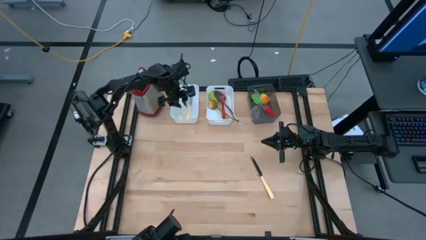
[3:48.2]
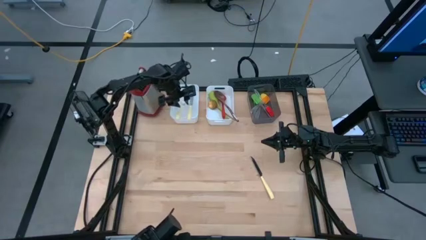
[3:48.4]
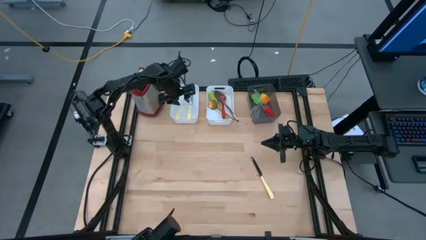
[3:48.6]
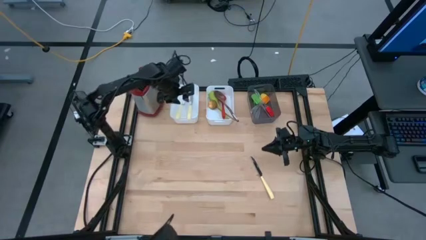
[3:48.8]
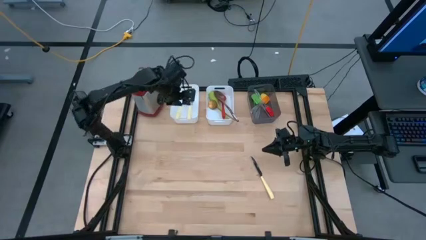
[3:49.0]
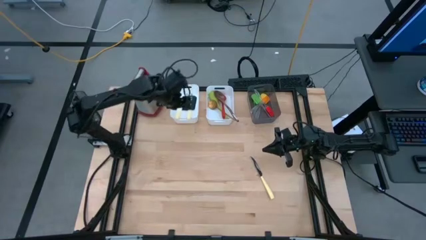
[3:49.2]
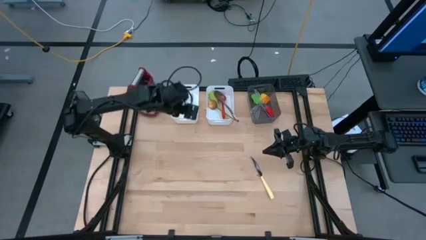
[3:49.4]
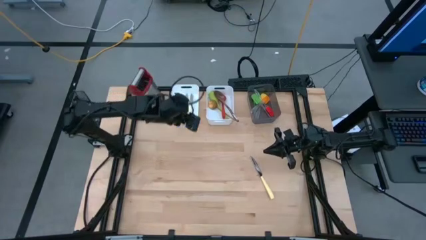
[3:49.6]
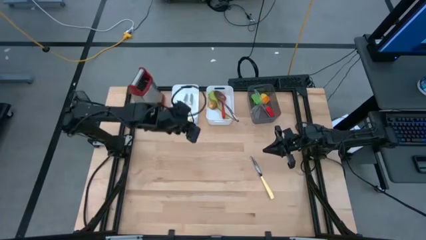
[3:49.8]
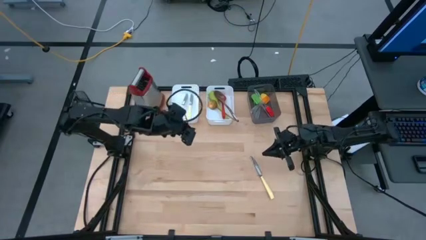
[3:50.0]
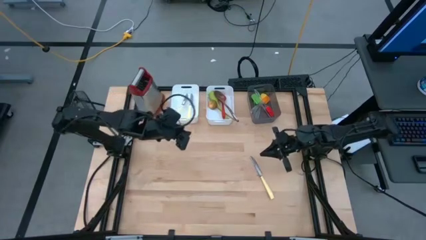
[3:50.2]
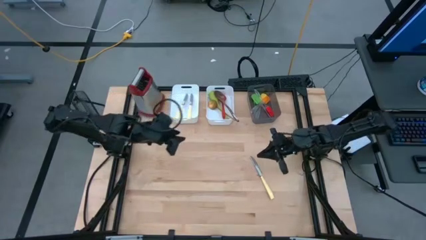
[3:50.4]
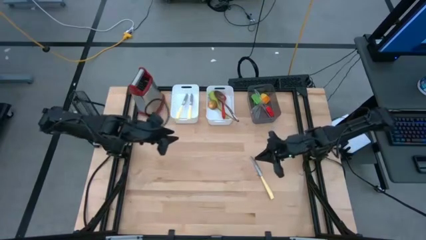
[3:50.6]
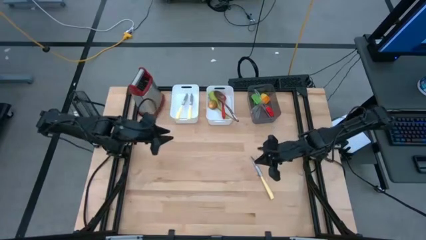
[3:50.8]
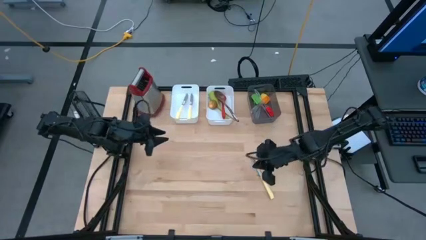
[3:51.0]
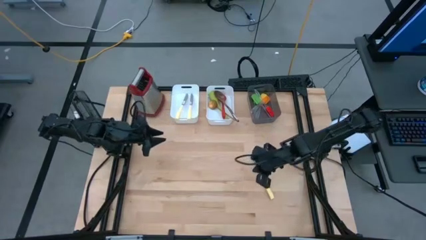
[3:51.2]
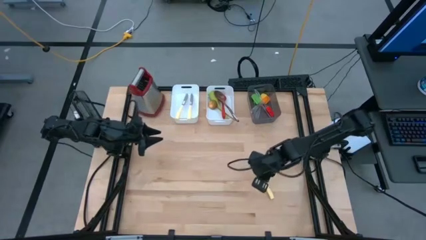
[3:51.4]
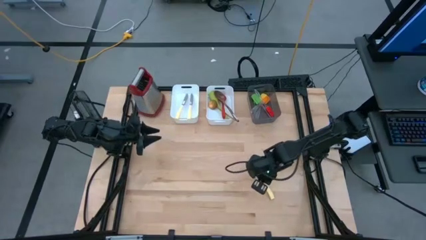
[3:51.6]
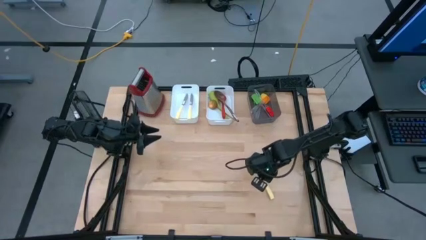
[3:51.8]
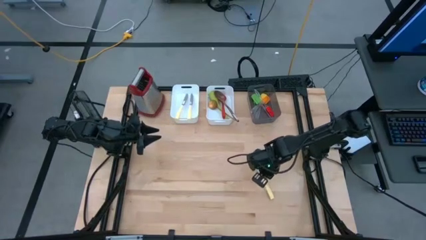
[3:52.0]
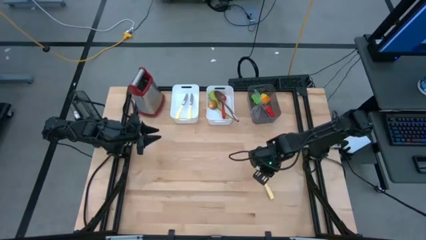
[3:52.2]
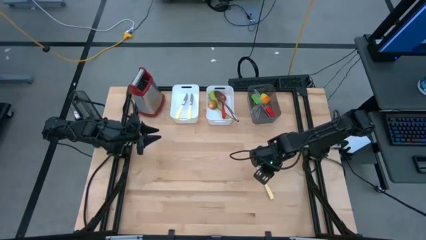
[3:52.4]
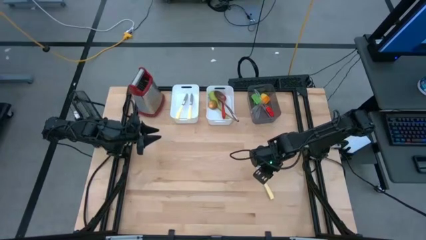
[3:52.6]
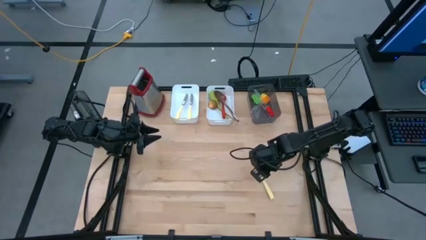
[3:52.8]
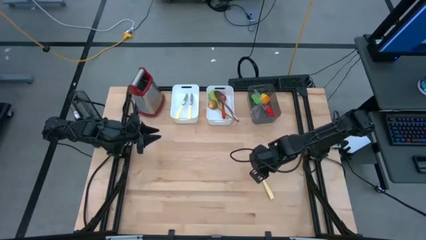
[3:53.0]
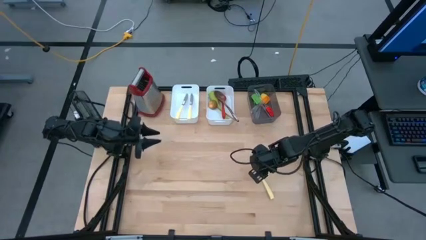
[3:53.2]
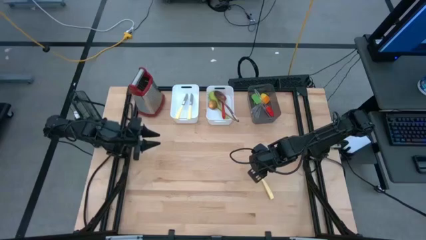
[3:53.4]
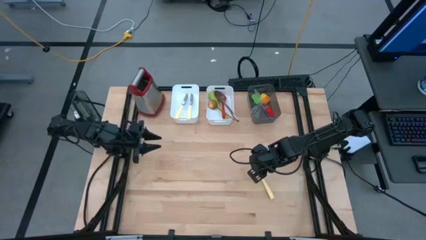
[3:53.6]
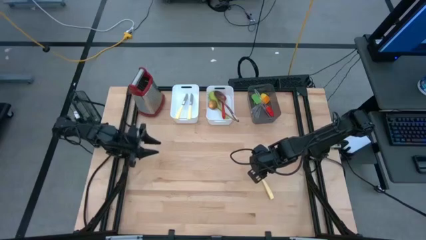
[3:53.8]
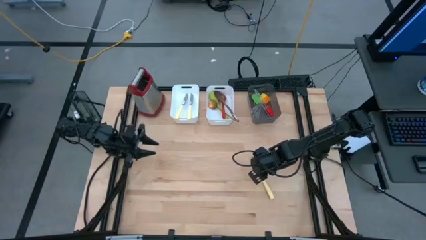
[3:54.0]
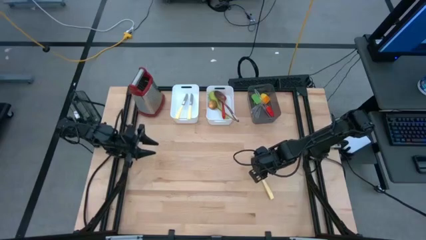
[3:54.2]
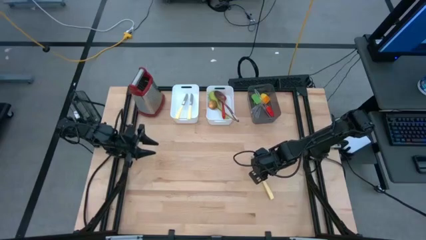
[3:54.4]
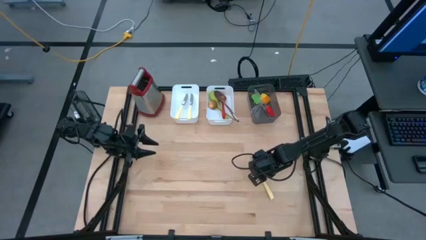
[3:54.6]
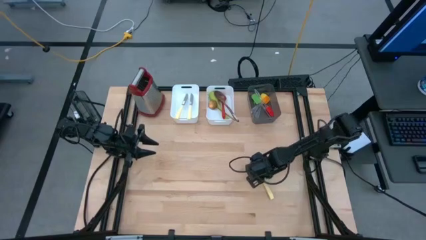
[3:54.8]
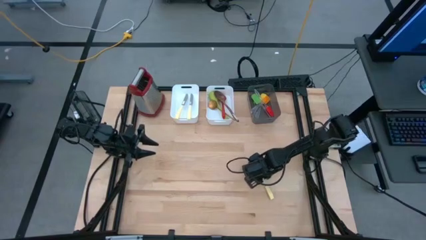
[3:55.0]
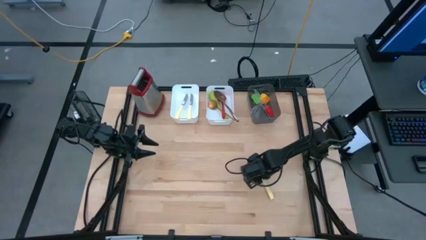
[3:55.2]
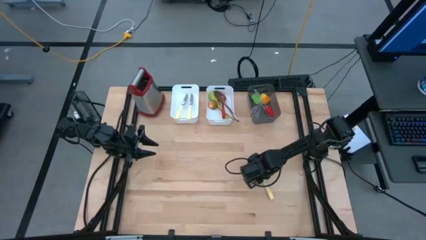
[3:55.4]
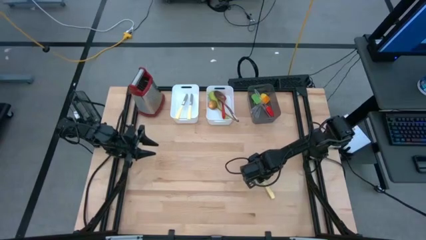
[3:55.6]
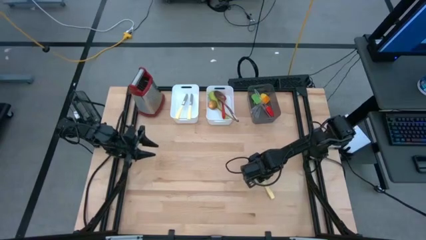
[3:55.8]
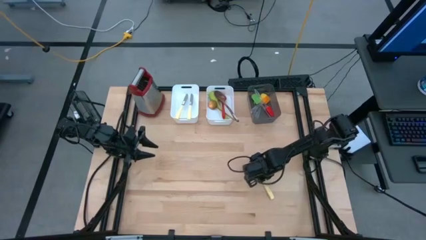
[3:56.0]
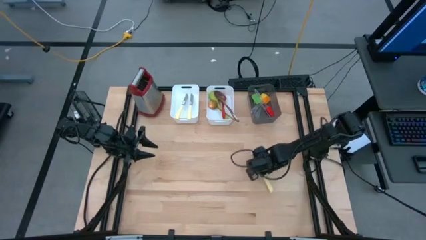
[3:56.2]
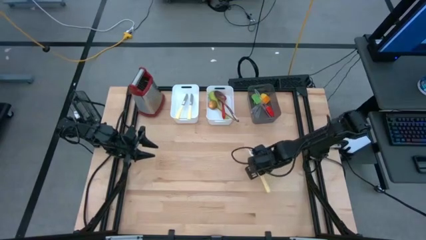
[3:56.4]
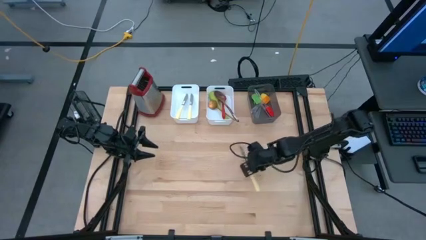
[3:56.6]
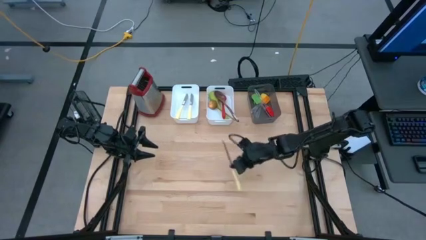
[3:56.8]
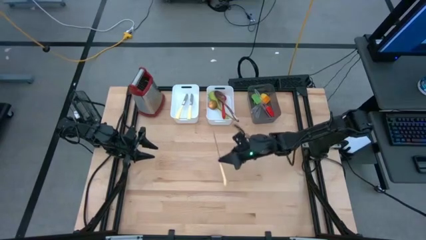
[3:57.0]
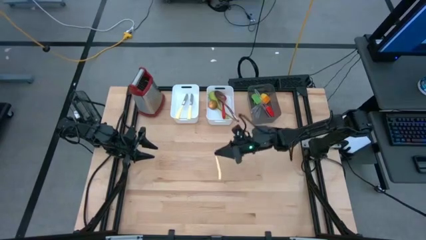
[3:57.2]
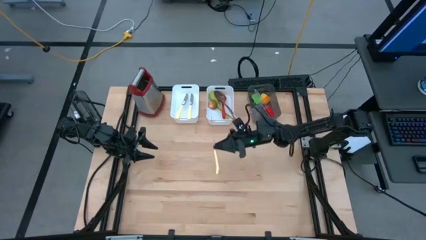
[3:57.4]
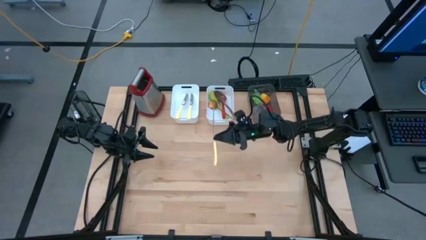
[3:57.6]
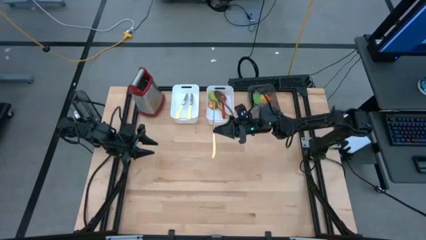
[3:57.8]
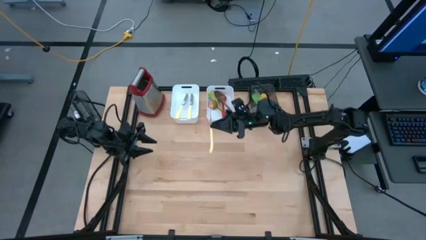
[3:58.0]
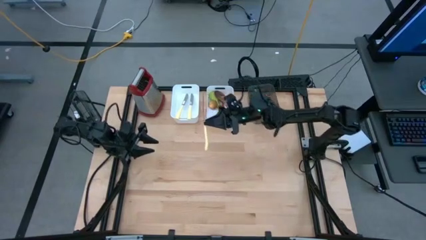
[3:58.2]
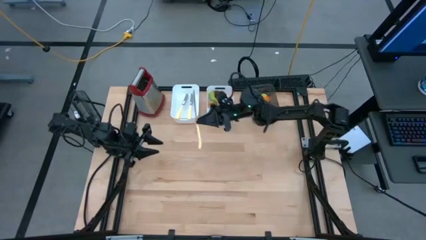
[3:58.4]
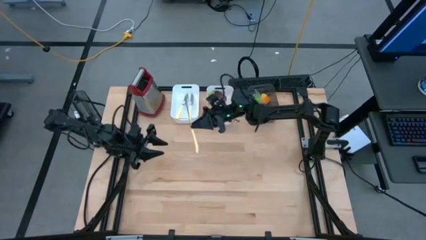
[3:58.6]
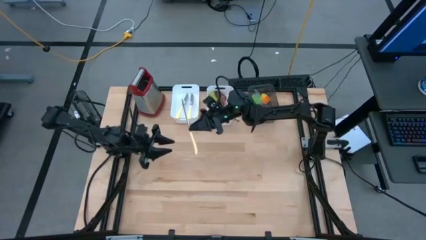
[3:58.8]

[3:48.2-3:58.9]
Task: Pick & Place Kitchen Items
Put the yellow table knife into the left white bin
